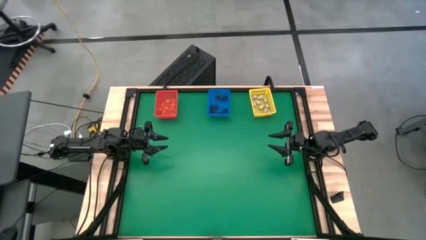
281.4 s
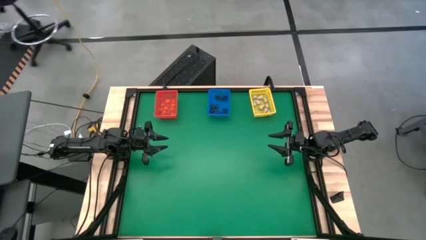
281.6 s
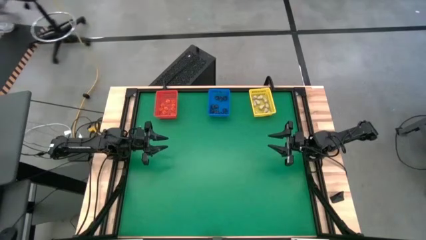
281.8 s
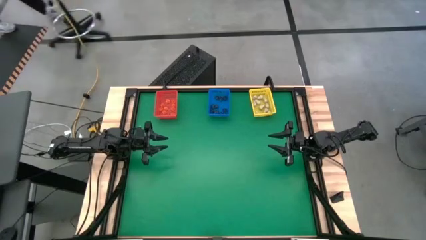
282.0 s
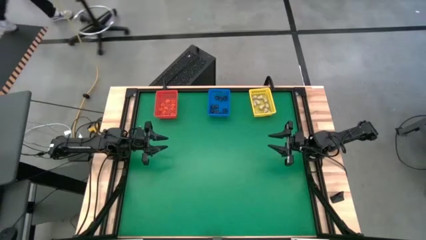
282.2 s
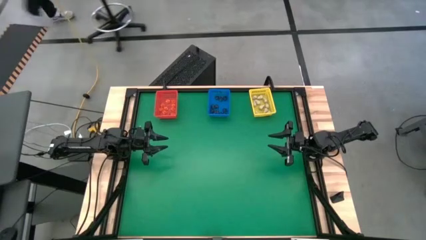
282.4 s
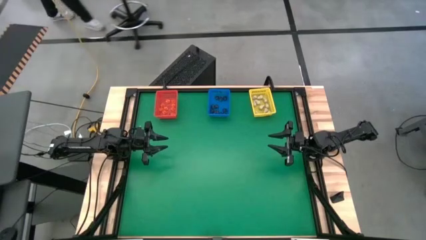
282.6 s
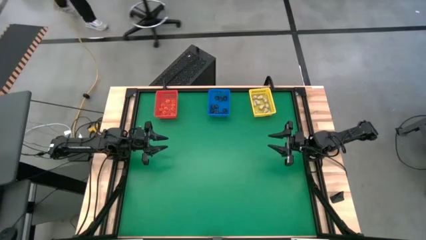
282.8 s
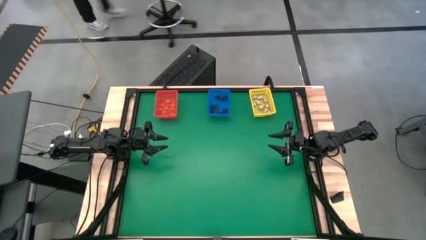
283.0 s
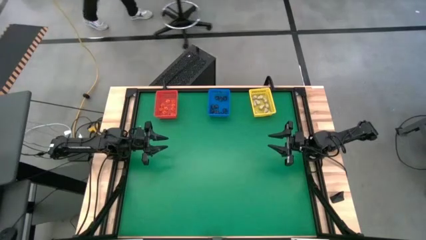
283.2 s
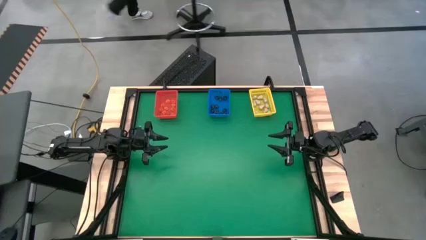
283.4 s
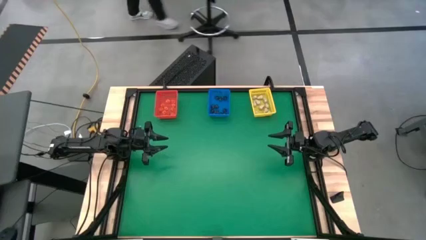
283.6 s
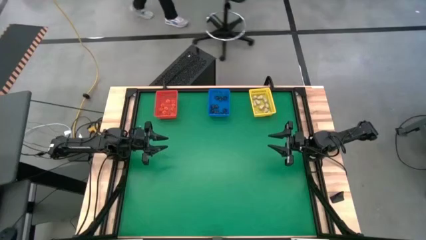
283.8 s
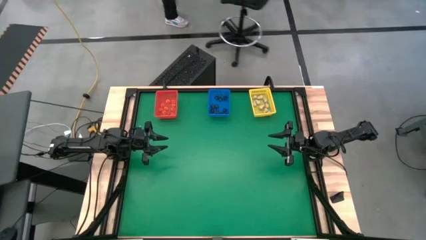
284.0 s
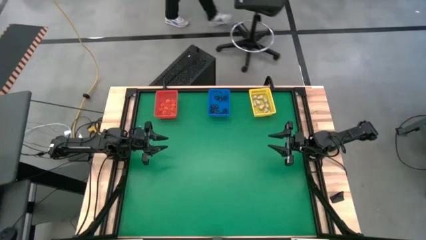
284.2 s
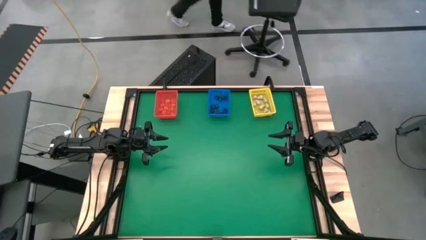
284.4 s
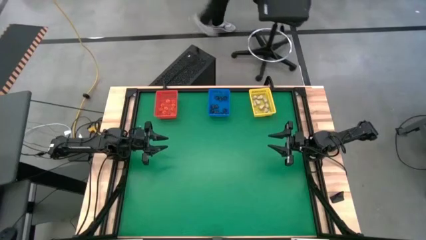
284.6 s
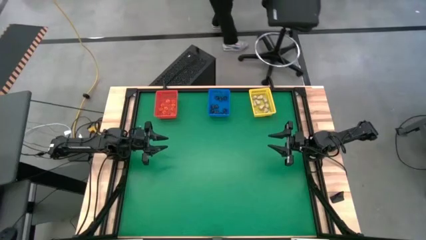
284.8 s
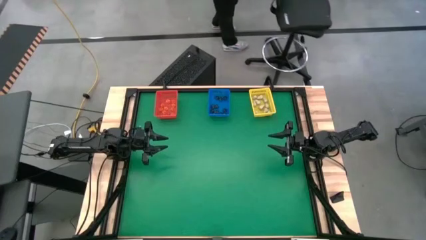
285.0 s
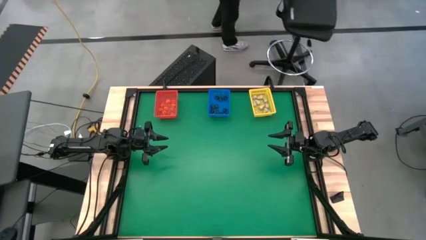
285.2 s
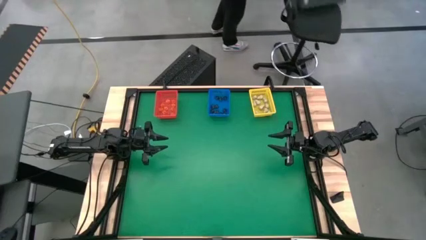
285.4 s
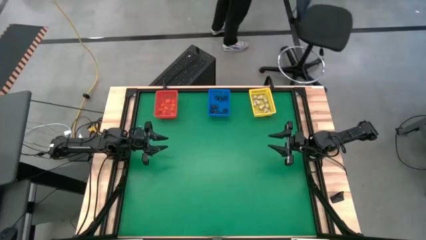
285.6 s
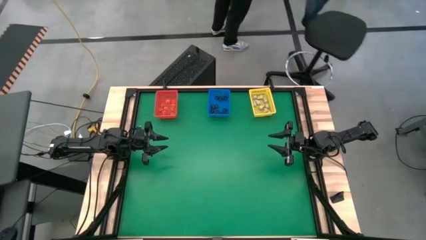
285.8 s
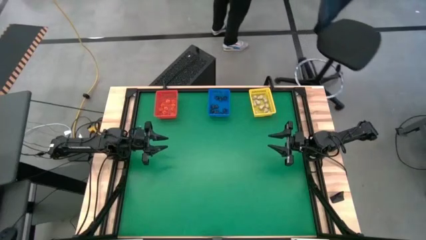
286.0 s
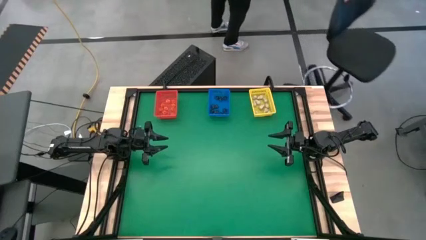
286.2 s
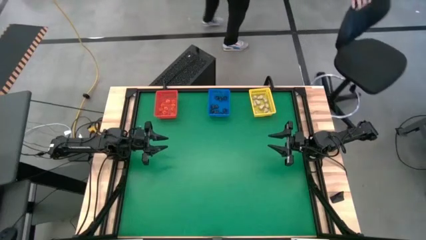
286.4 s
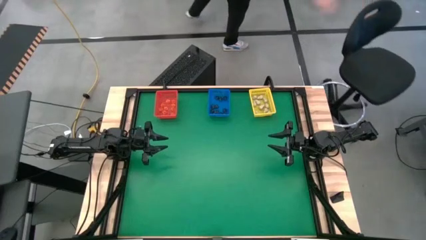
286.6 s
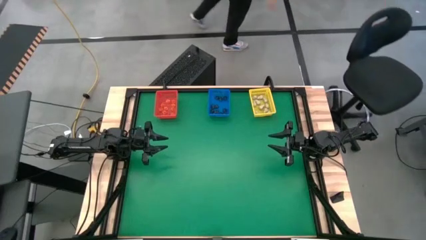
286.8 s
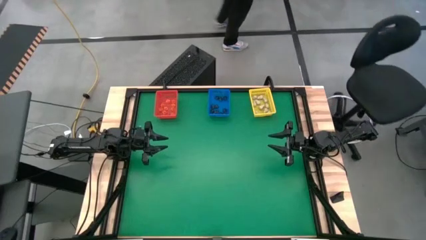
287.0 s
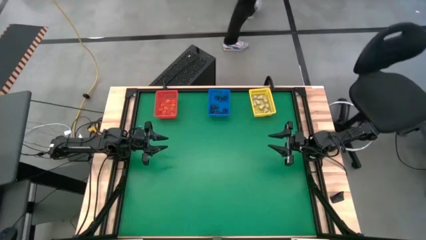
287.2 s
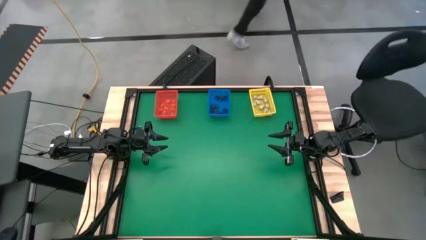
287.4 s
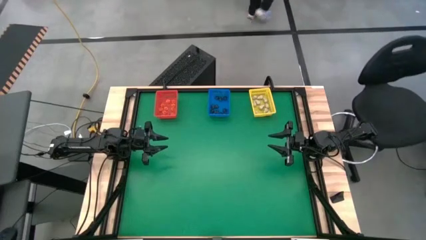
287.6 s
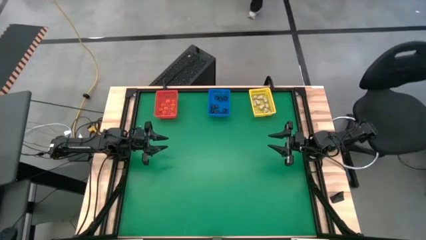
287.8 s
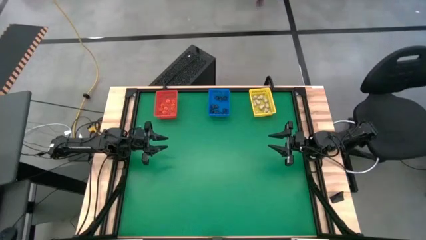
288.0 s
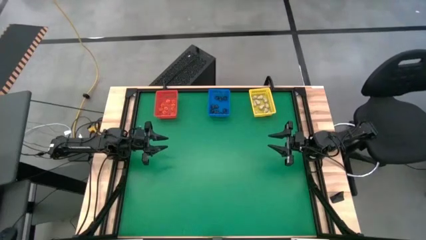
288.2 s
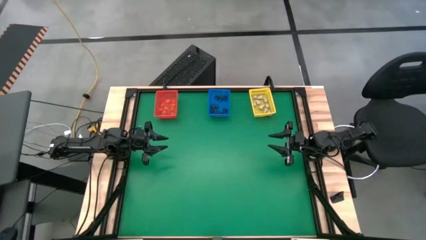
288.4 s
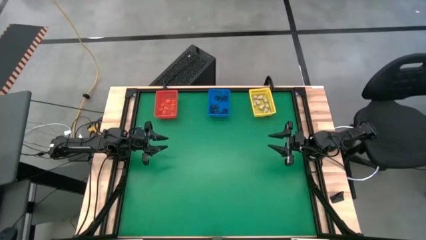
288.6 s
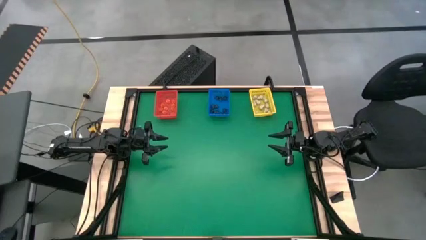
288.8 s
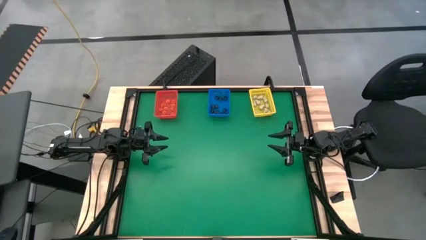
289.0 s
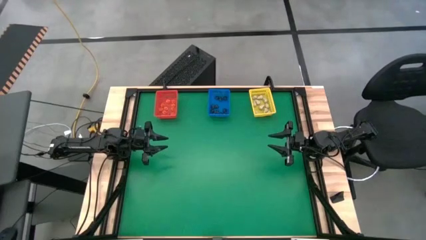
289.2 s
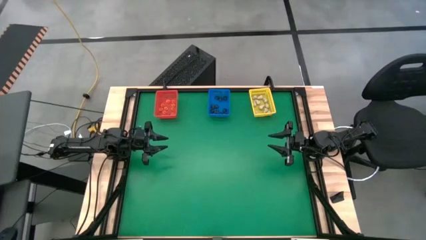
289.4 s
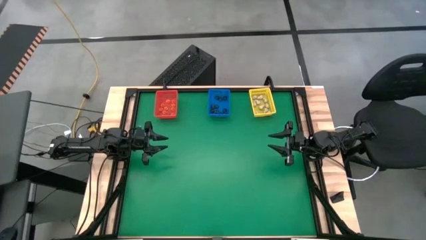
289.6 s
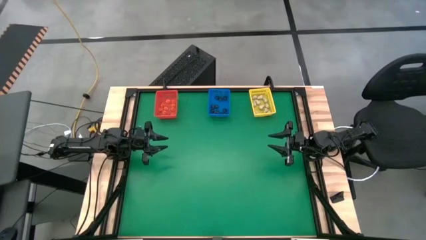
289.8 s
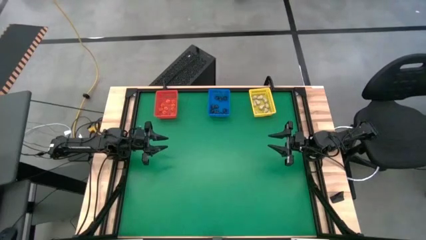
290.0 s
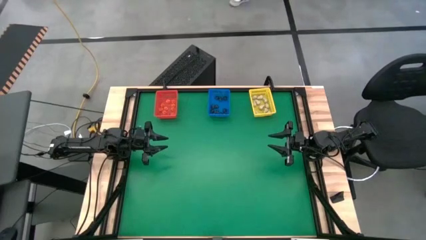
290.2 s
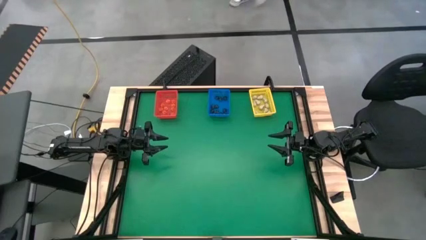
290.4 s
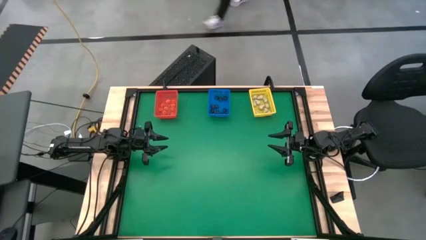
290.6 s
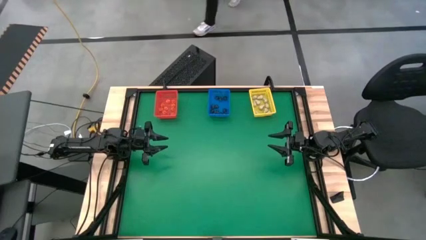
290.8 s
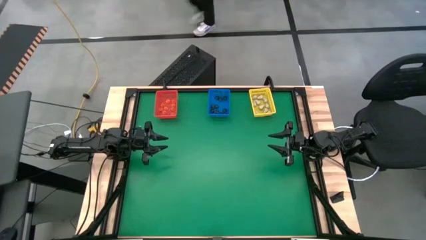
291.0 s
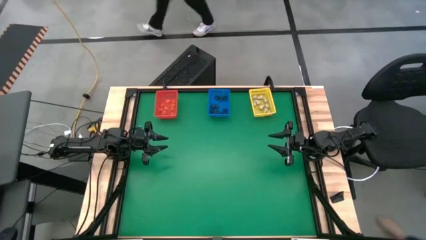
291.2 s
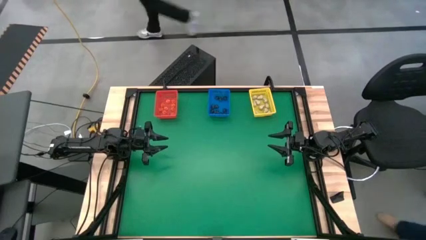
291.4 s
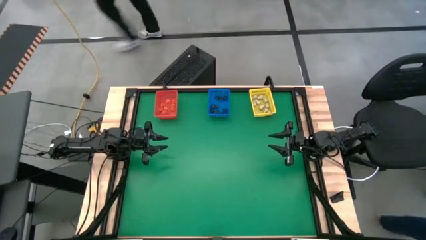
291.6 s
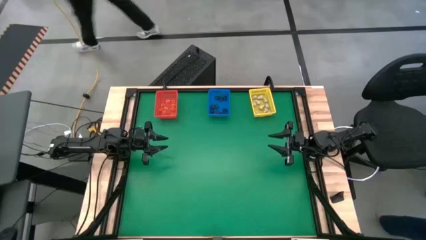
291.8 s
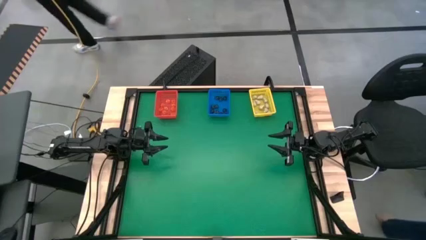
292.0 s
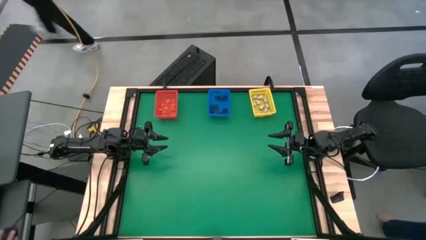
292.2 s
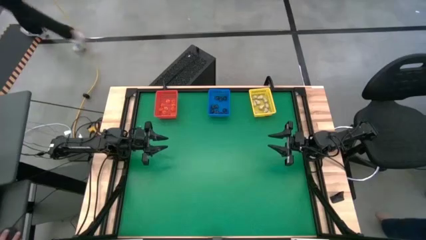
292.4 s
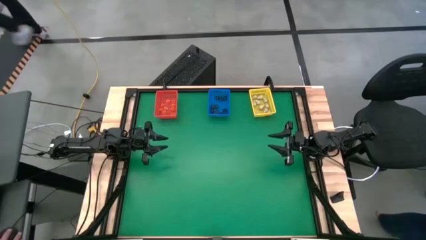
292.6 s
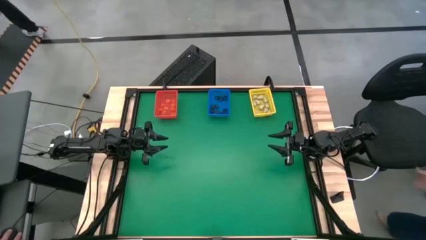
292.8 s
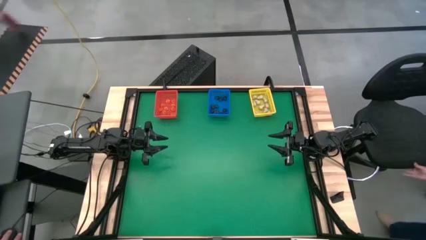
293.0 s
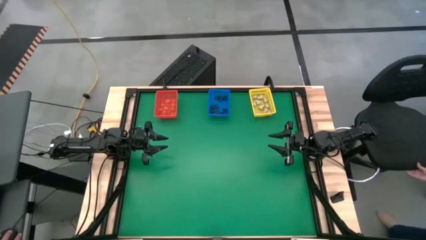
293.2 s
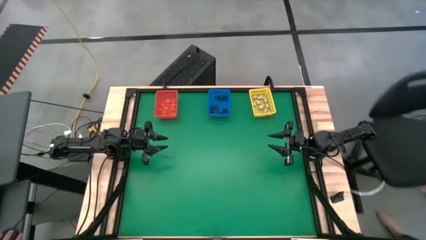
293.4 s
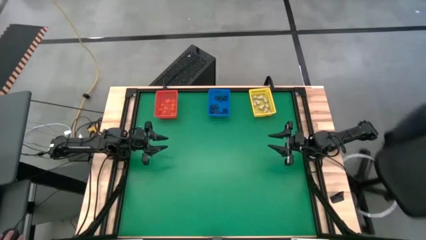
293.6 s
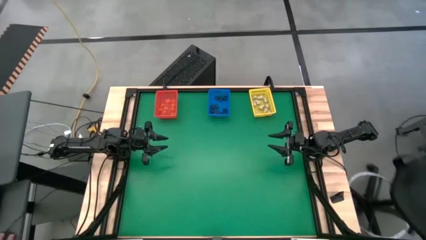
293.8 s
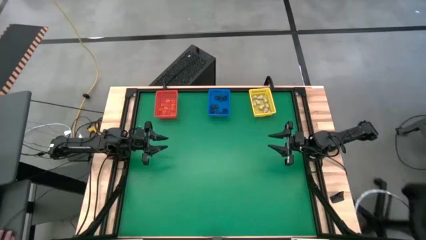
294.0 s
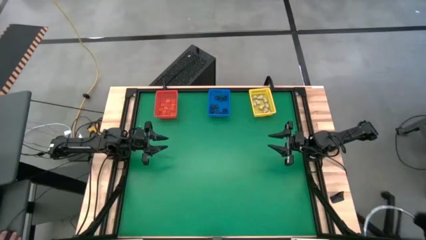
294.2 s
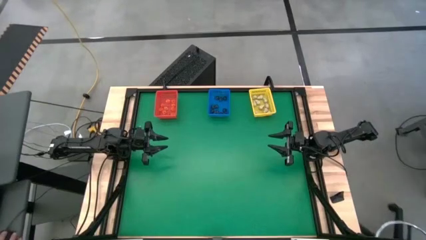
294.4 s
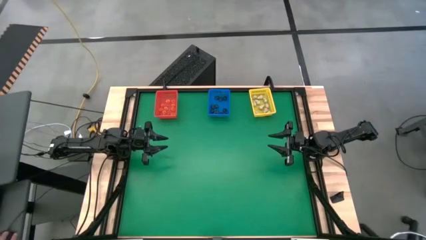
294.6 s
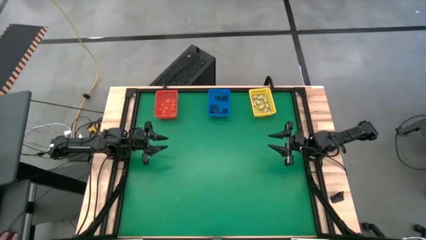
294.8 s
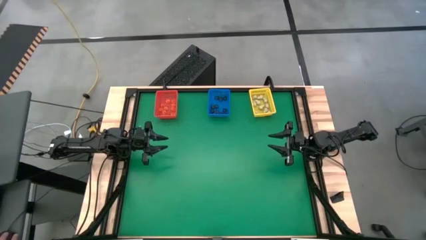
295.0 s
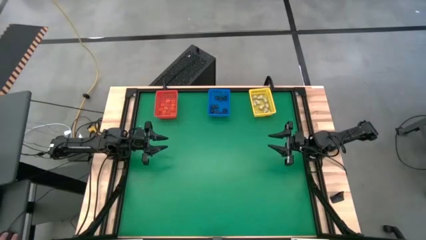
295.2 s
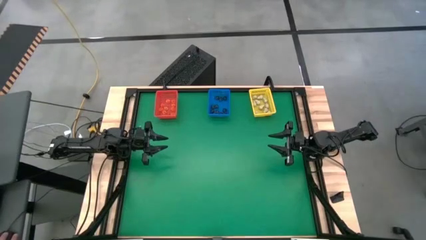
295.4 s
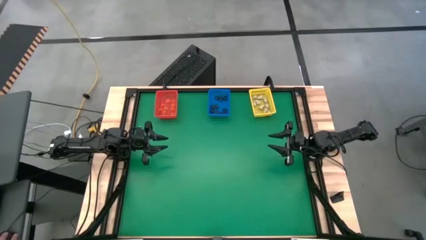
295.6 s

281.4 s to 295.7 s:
Task: Sort Halloween decoration
Return to Home Position
